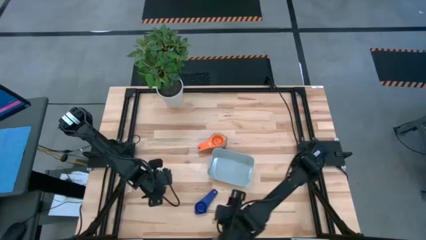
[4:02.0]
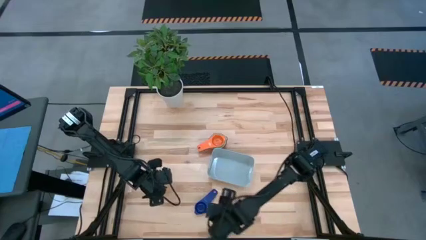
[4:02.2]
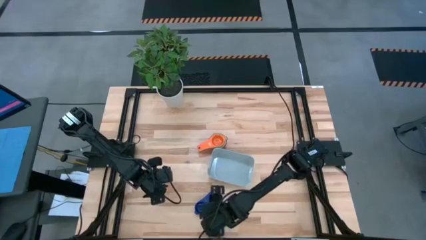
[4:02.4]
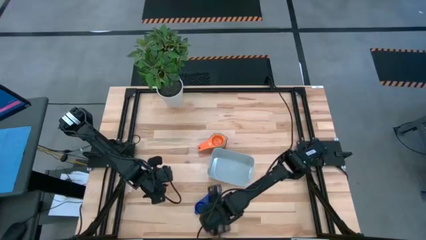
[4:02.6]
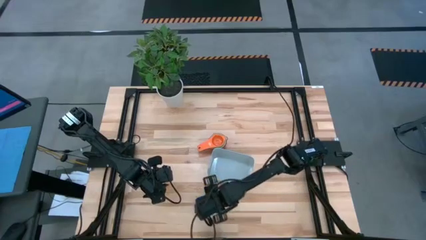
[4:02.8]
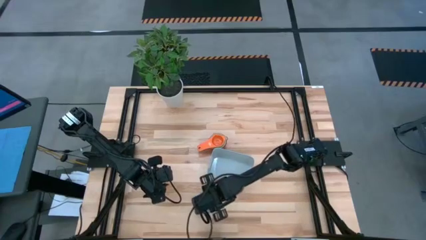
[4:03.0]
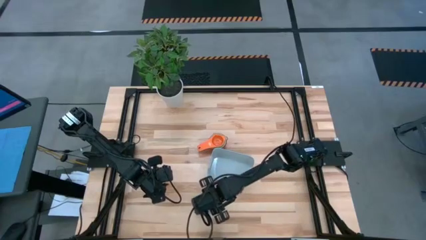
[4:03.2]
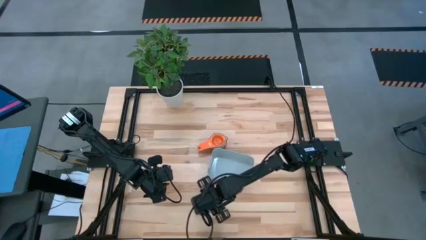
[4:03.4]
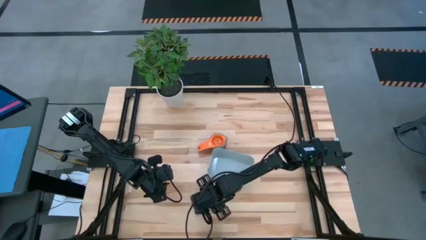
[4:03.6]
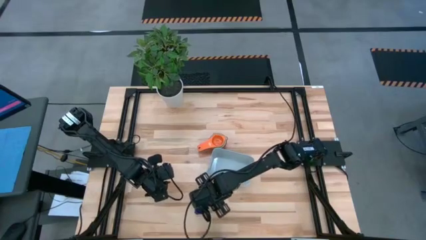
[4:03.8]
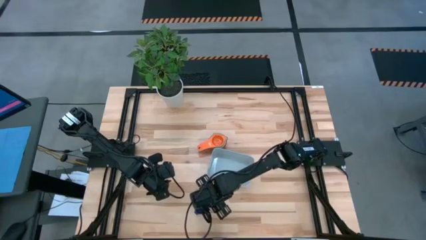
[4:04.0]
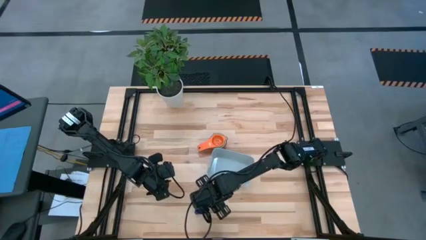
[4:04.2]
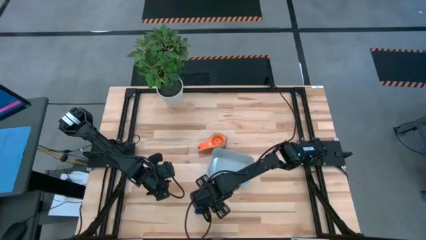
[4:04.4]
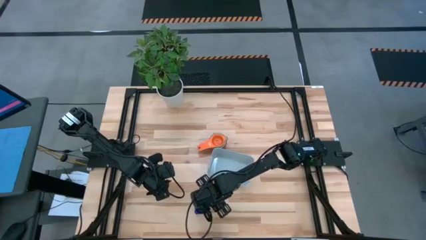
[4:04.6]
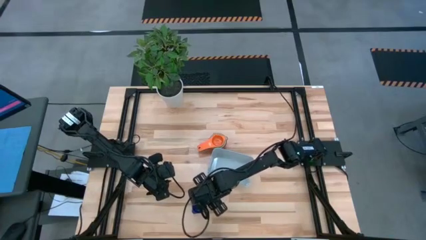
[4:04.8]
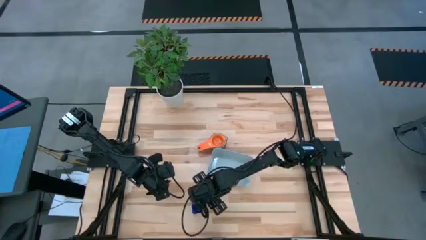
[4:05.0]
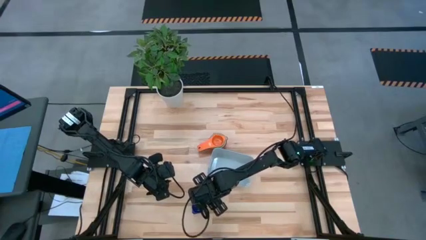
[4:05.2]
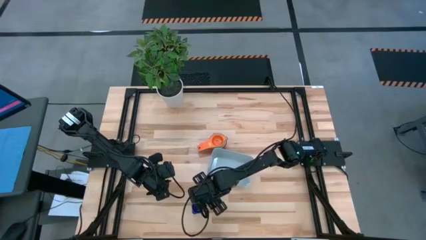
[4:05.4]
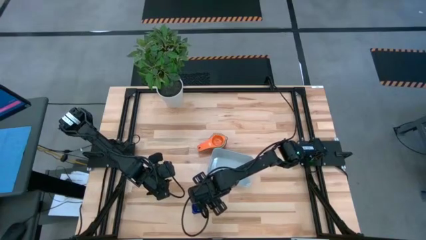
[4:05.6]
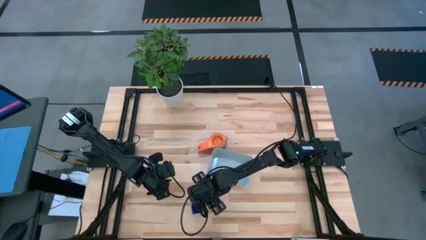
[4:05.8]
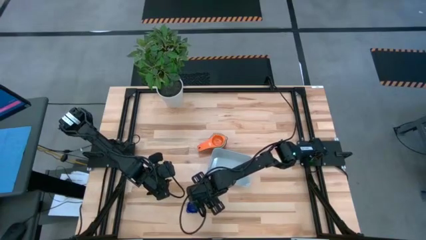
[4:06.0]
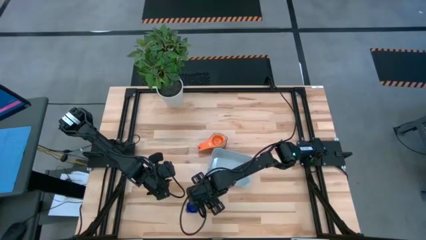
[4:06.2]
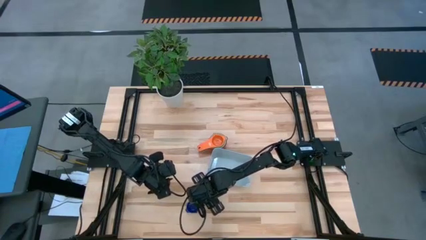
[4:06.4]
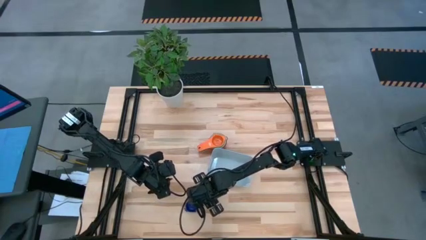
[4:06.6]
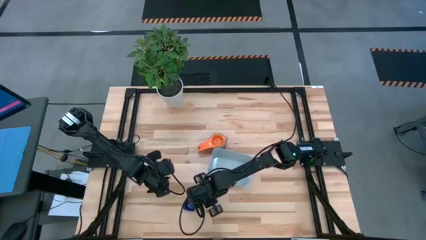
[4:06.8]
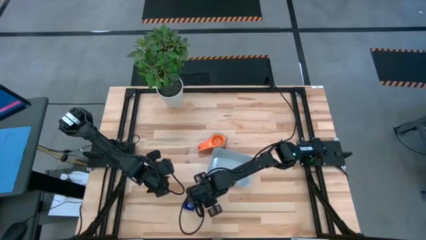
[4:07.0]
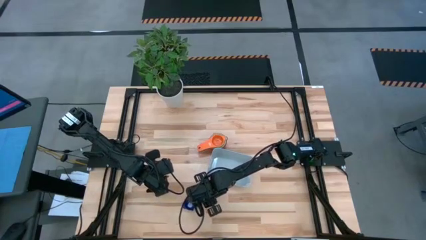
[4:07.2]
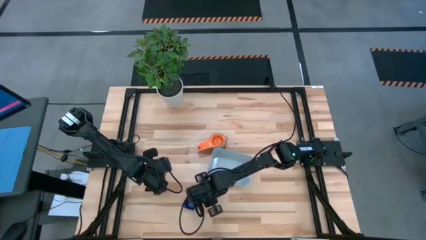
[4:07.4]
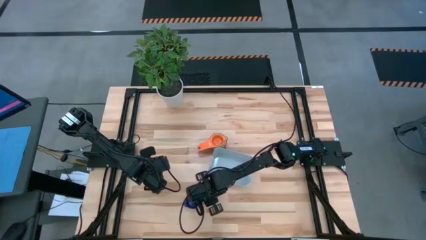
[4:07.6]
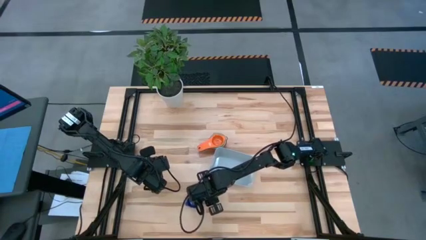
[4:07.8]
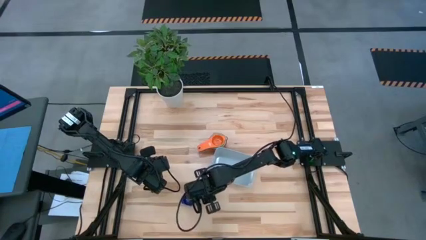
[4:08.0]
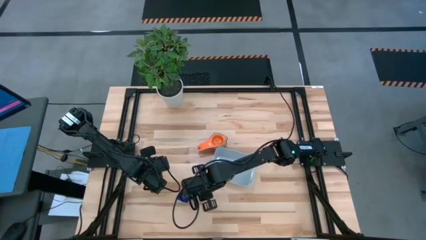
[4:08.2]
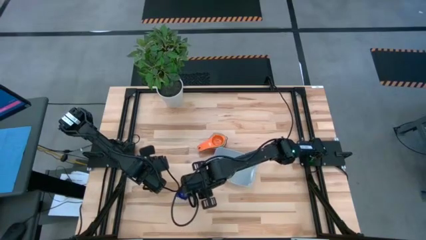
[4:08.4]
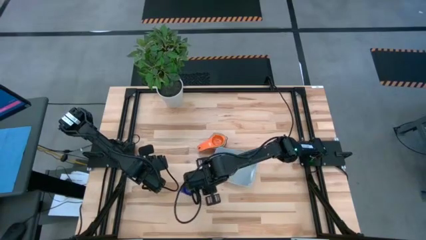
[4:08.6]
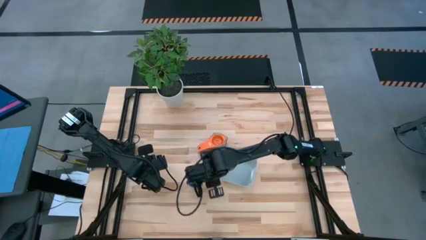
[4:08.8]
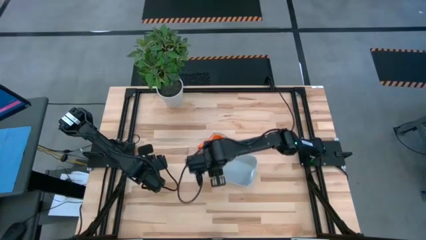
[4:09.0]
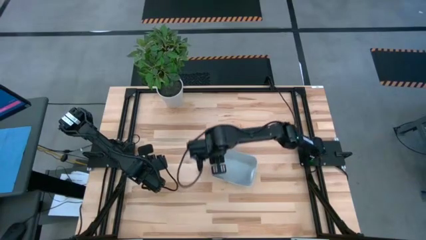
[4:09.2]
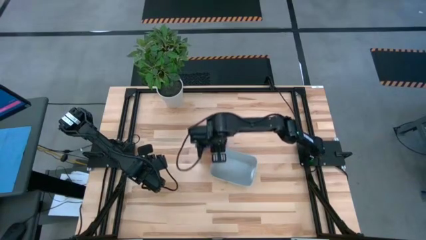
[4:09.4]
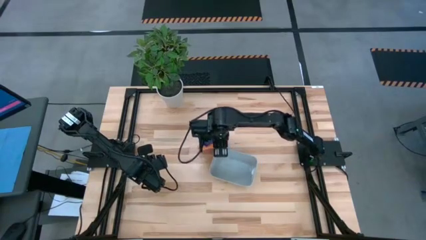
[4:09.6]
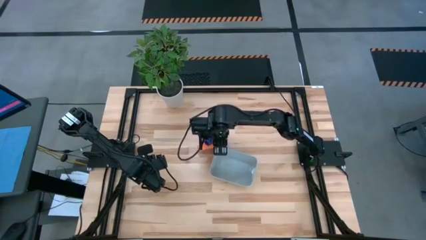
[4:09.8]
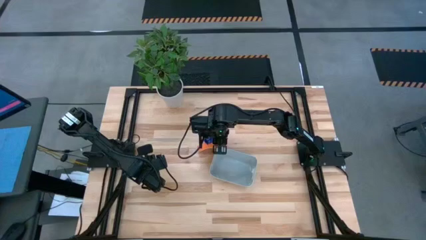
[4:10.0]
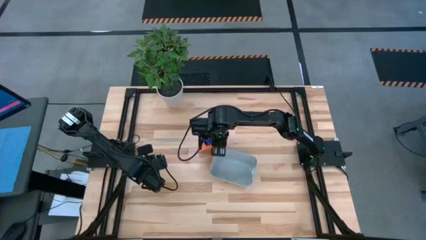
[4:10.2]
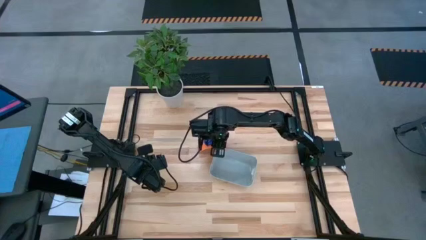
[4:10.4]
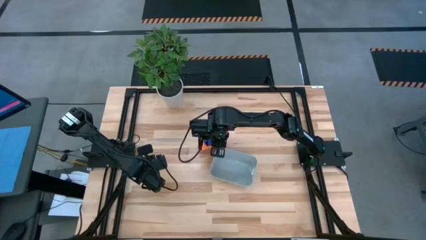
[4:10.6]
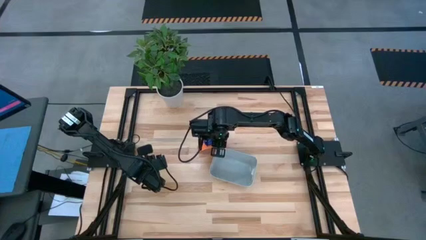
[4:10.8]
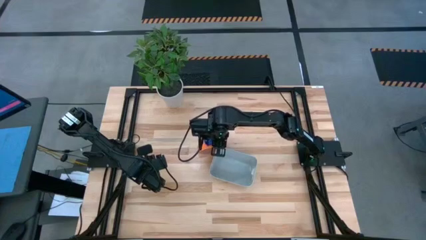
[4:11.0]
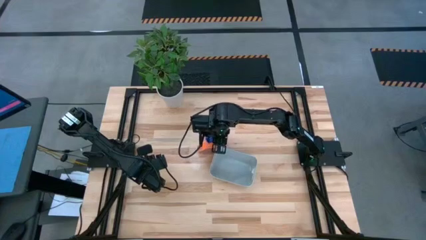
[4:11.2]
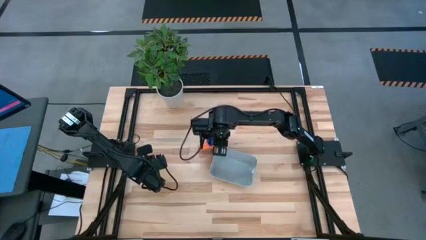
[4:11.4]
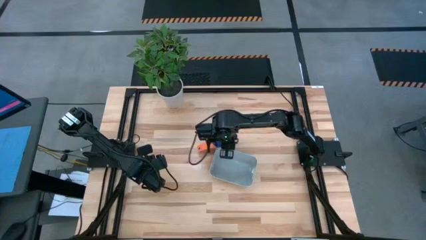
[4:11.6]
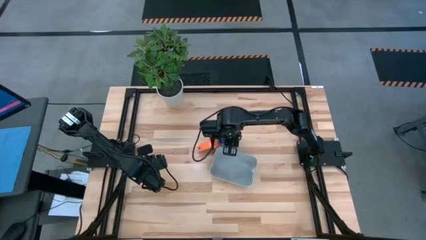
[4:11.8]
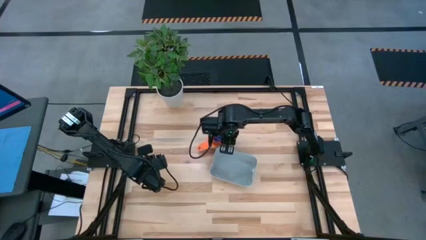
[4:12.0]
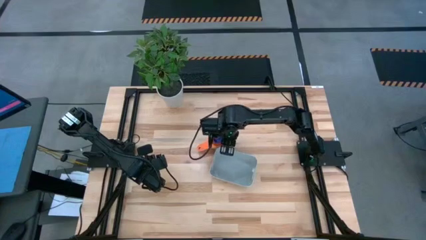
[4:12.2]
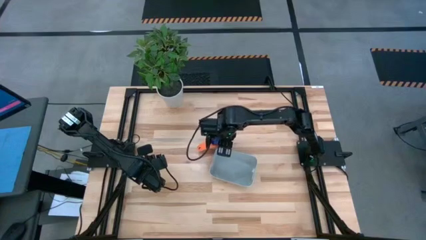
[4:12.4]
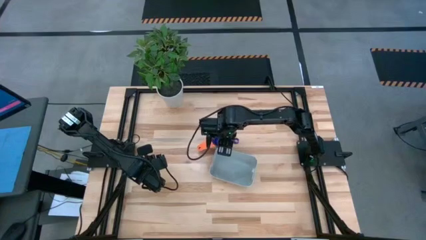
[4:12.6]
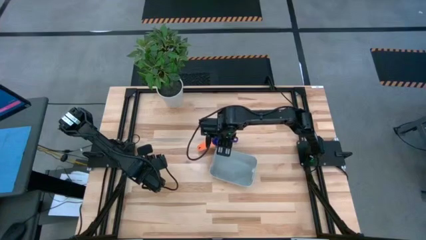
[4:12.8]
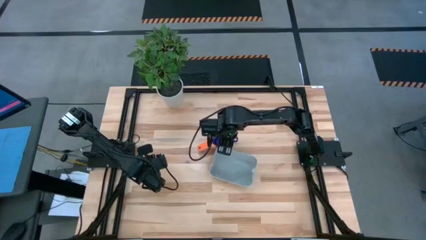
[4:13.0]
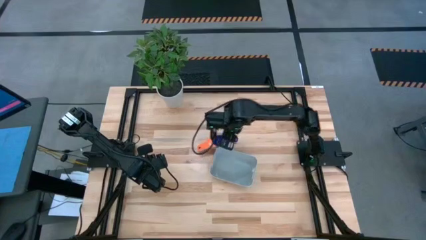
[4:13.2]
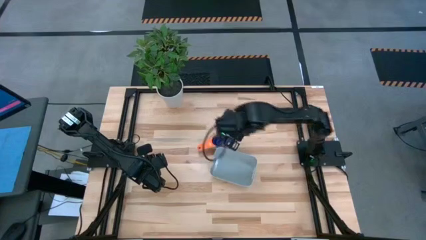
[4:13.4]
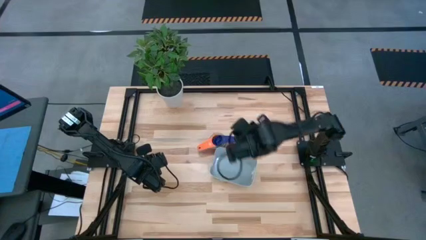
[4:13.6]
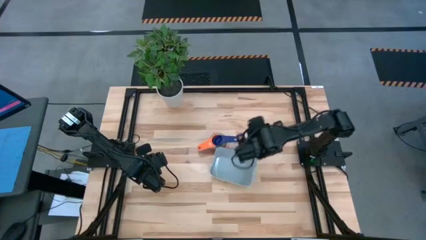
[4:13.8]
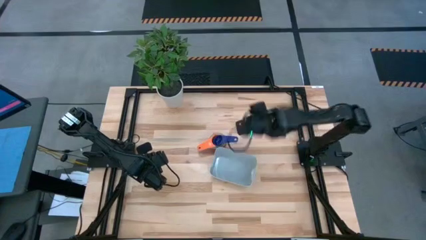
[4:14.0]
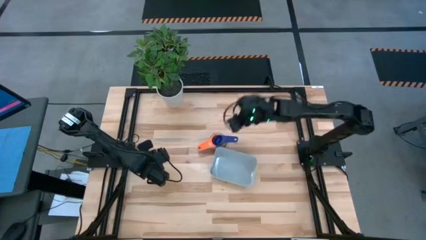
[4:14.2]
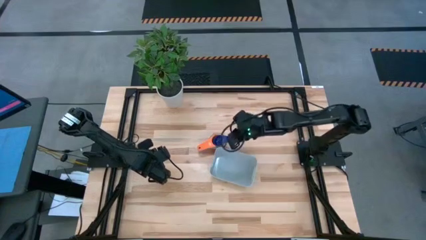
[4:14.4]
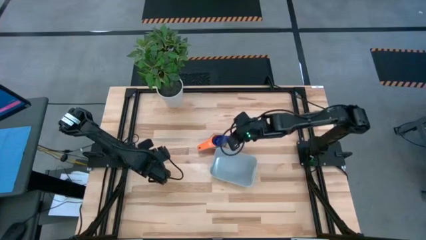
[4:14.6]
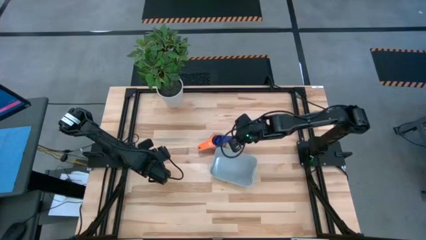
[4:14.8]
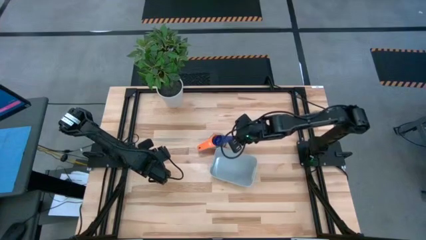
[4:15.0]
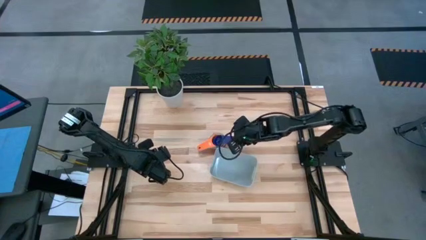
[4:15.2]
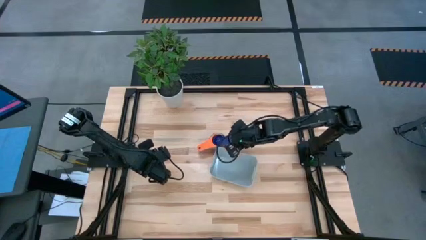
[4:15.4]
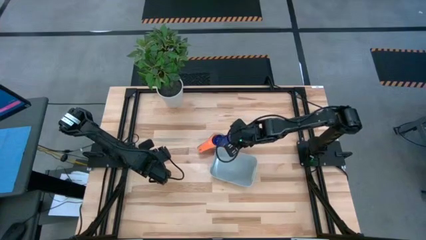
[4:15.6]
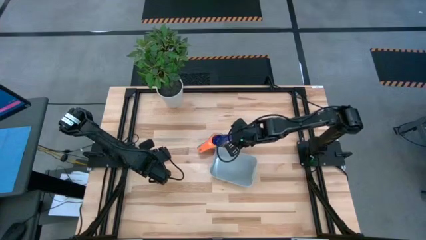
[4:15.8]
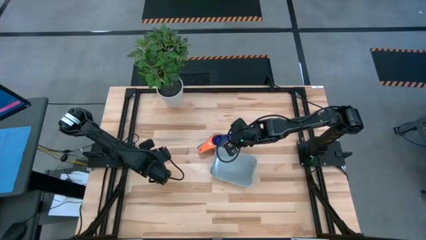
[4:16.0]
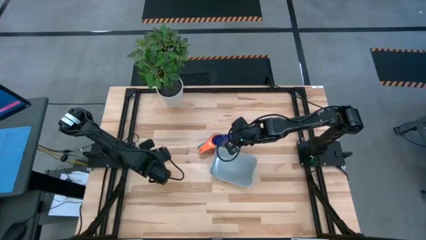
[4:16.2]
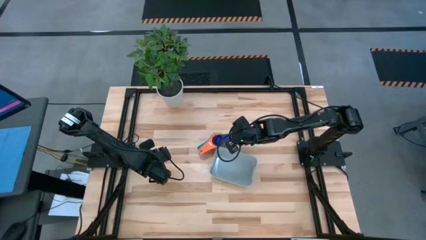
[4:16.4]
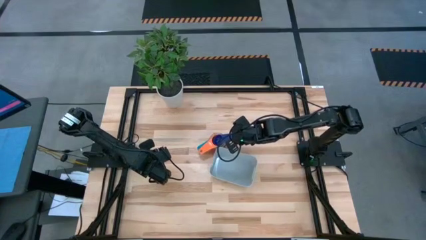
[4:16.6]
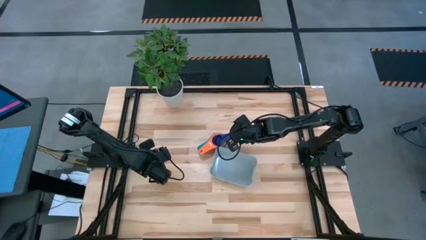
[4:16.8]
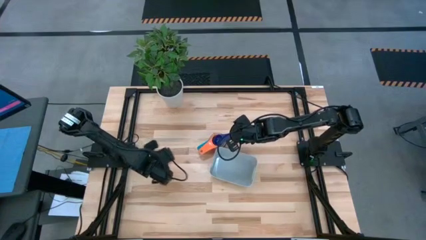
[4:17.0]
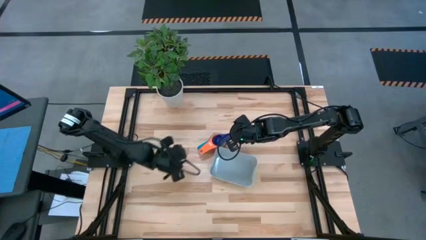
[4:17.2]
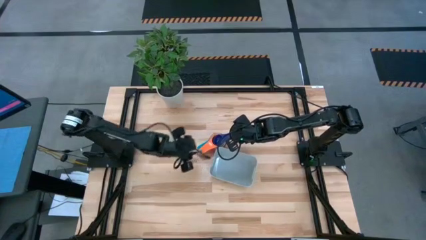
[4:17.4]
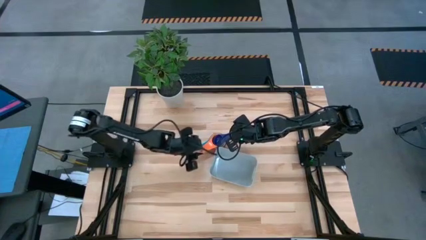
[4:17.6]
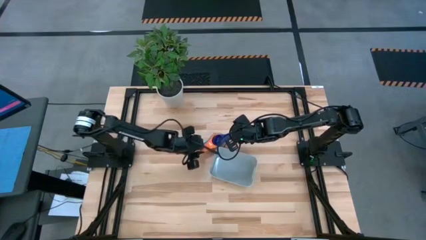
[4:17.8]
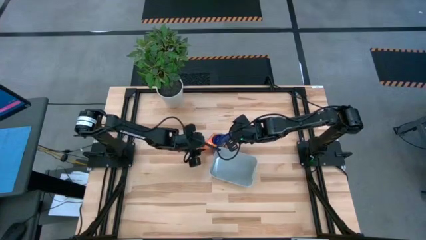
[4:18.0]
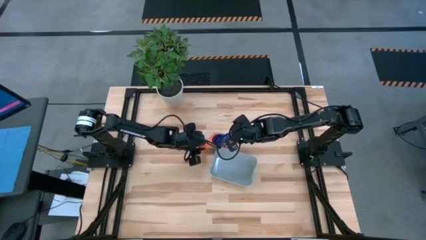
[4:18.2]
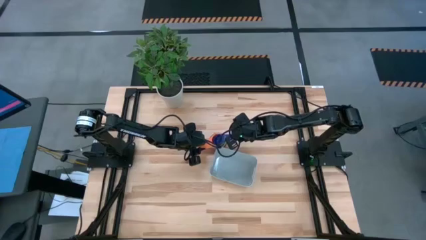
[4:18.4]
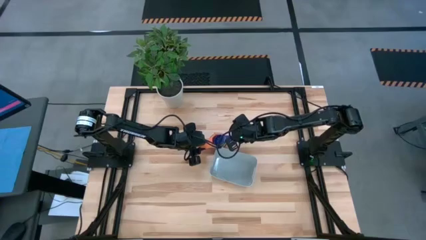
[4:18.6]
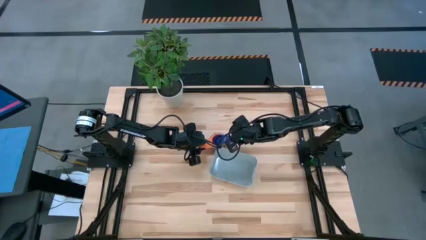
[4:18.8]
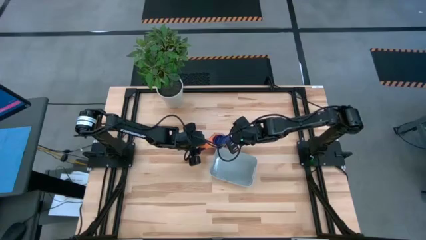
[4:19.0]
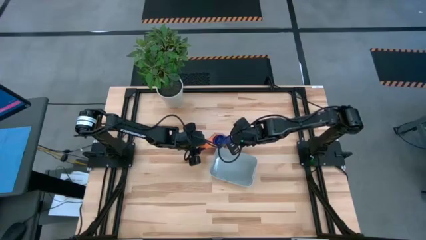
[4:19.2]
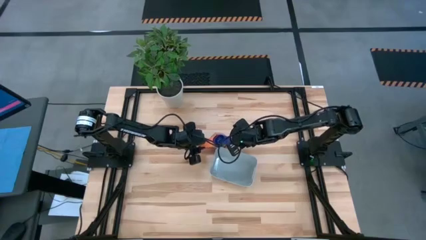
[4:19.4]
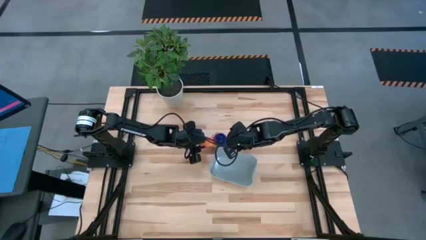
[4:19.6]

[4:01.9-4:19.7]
Task: Nest measuring cups in basket
Stack the dark blue measuring cup on top of the orange measuring cup
